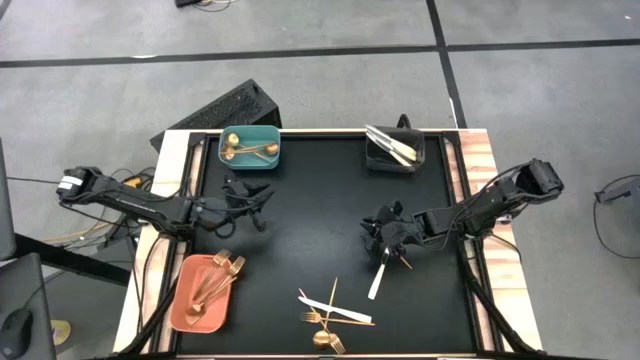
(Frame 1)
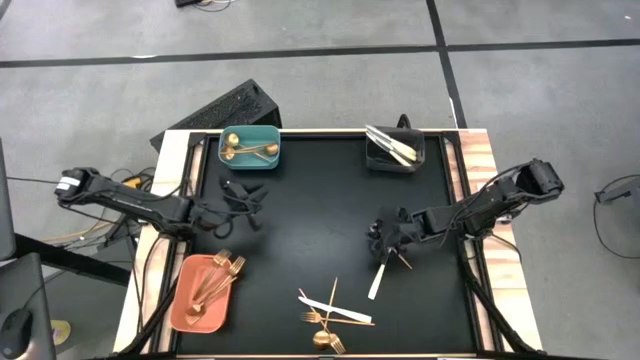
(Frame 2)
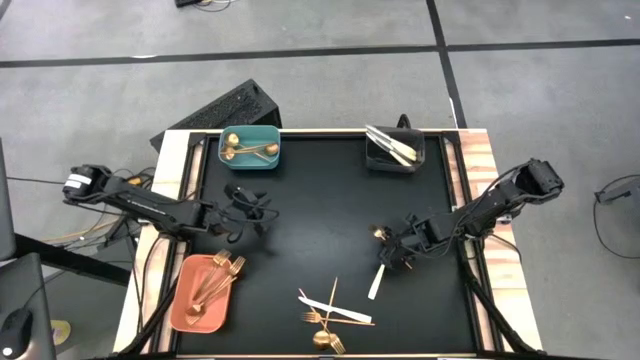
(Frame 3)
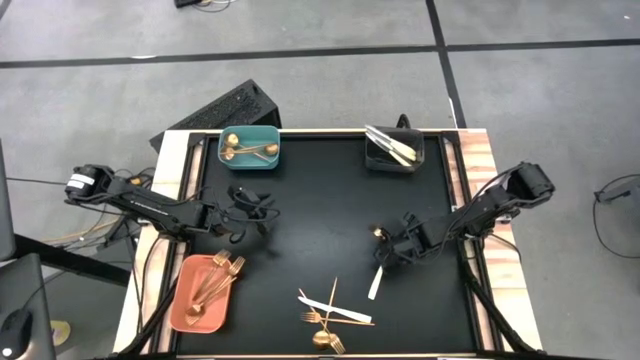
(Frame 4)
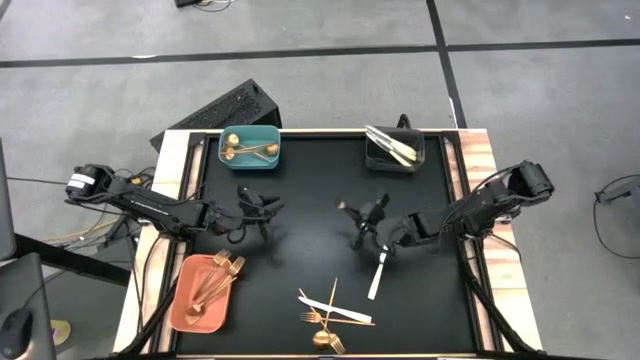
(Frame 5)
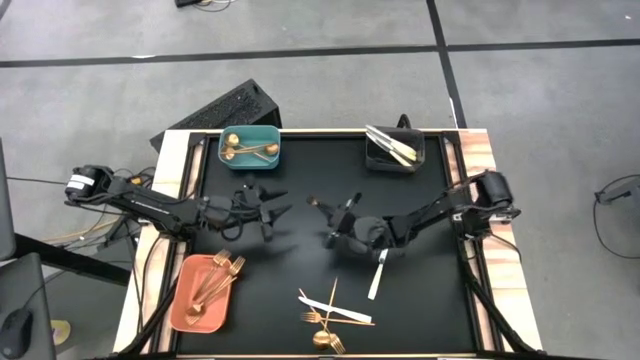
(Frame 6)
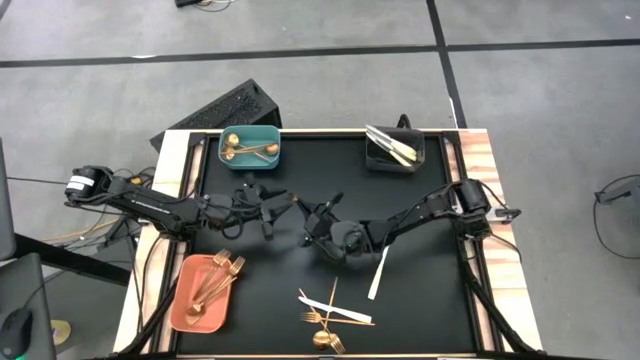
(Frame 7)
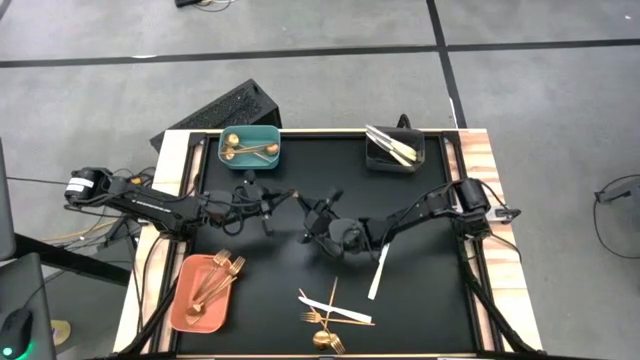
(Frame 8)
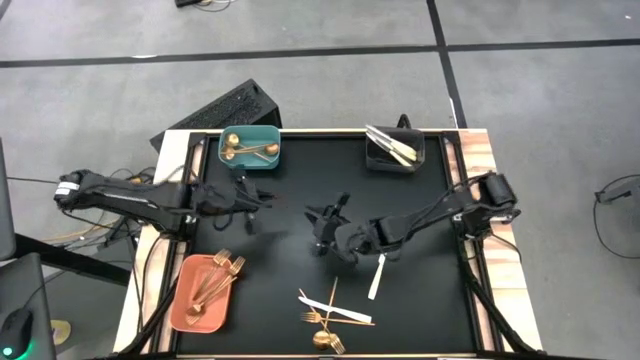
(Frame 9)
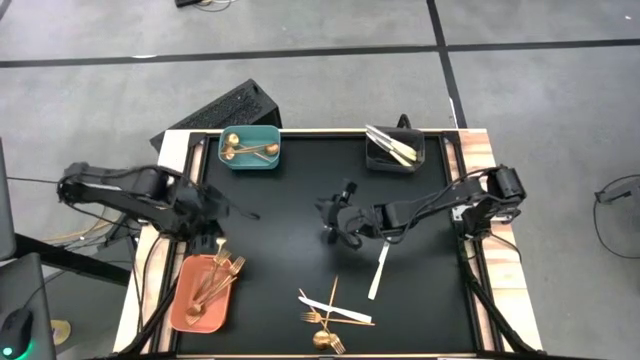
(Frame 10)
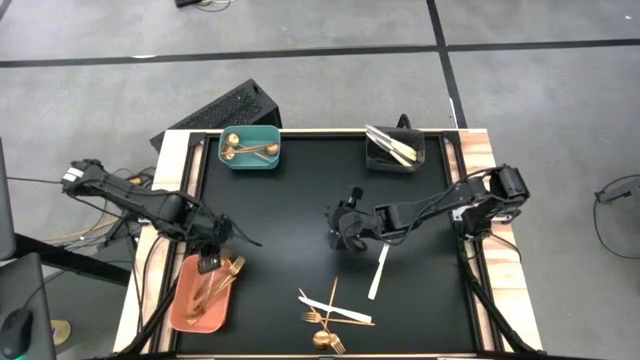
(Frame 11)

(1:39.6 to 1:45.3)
Task: Sort silverware by color (type)
Put the gold fork into the orange bin

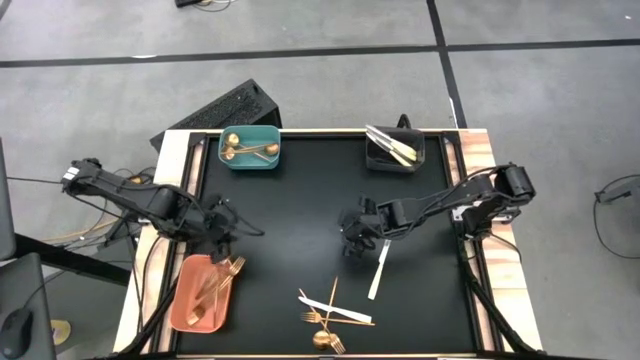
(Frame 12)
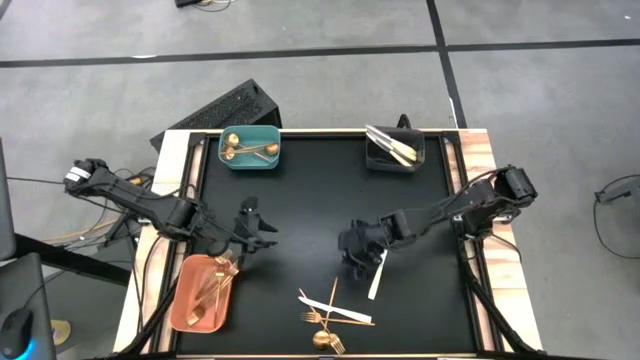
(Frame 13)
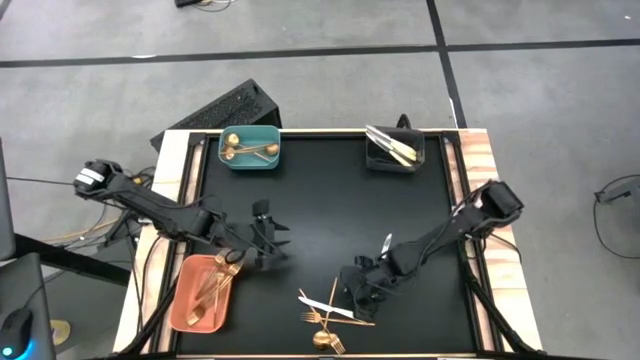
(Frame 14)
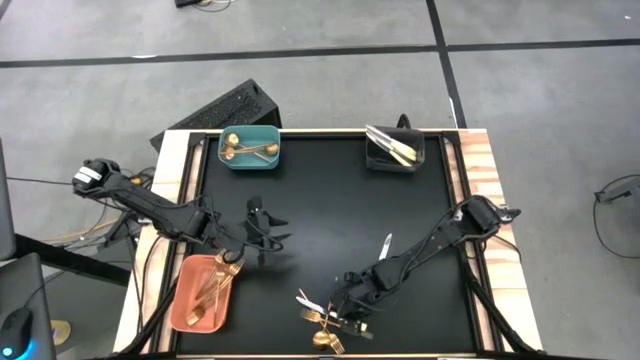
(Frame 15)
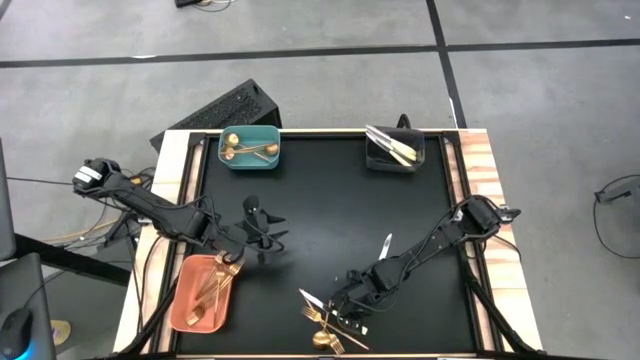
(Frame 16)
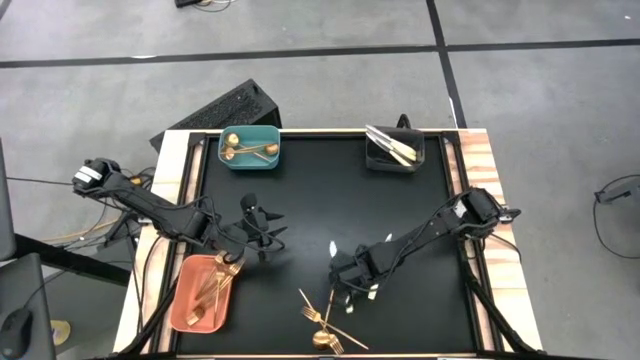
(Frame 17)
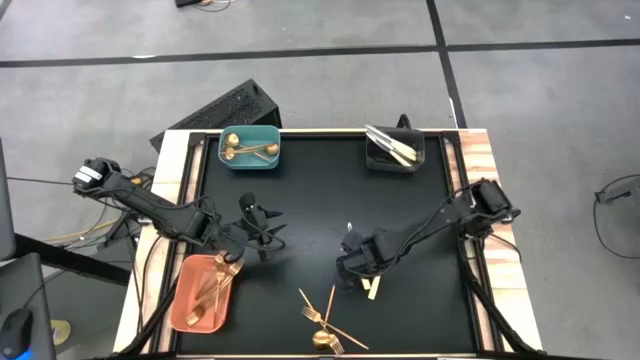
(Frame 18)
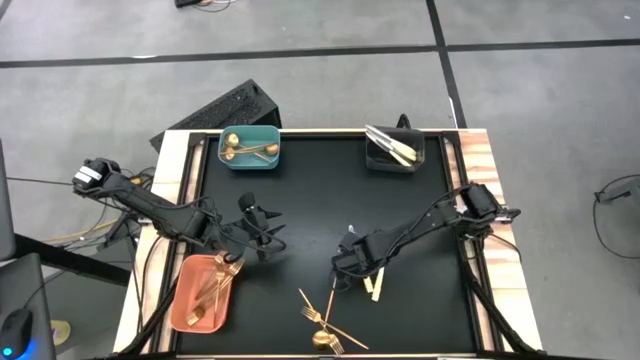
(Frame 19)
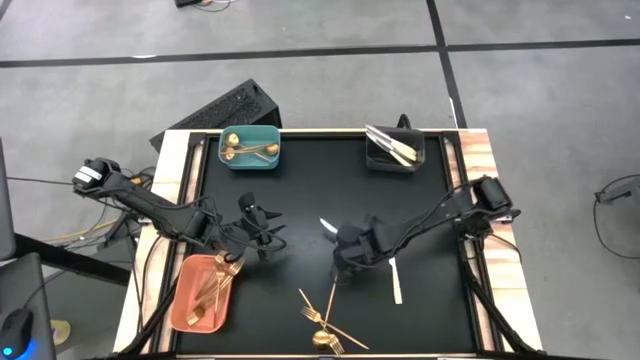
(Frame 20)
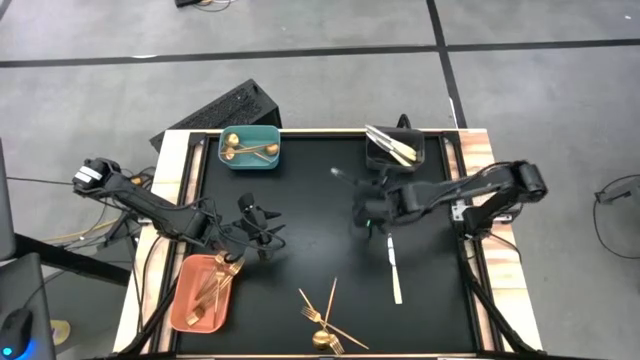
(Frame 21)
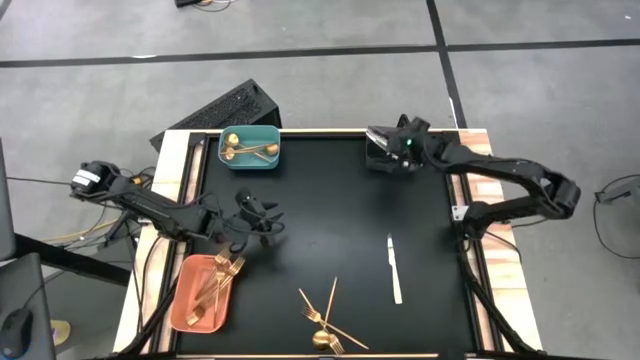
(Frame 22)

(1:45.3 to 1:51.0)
Put the white knife into the black bin

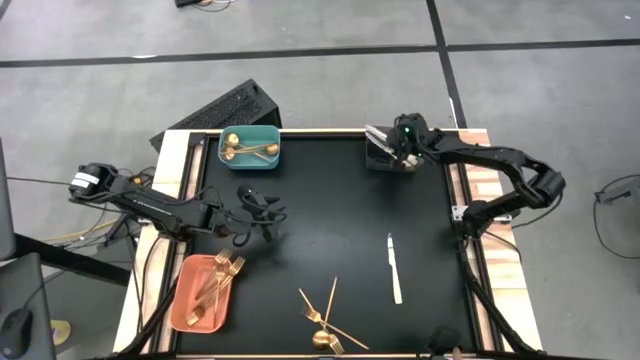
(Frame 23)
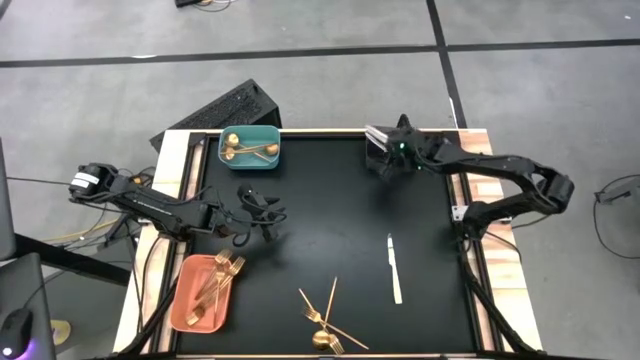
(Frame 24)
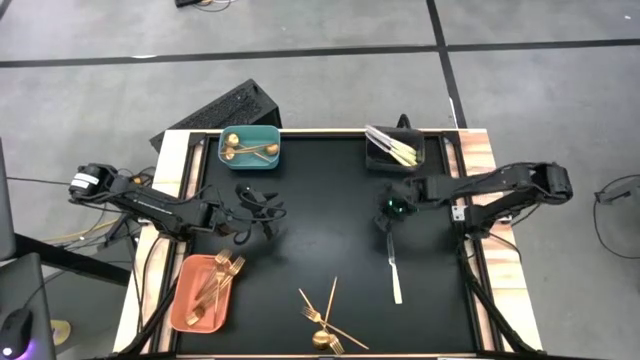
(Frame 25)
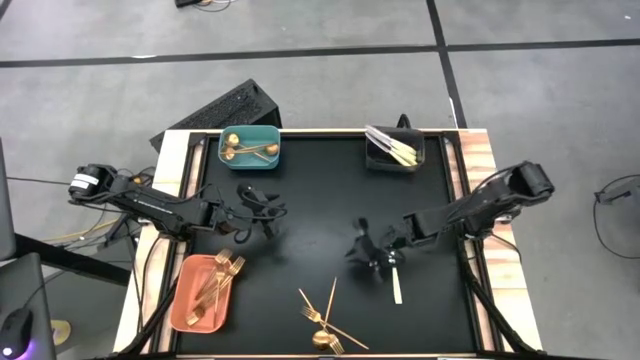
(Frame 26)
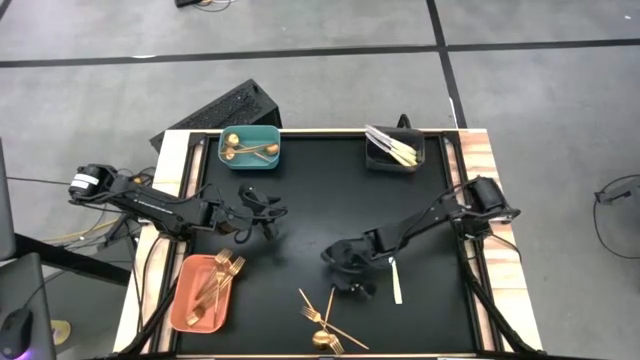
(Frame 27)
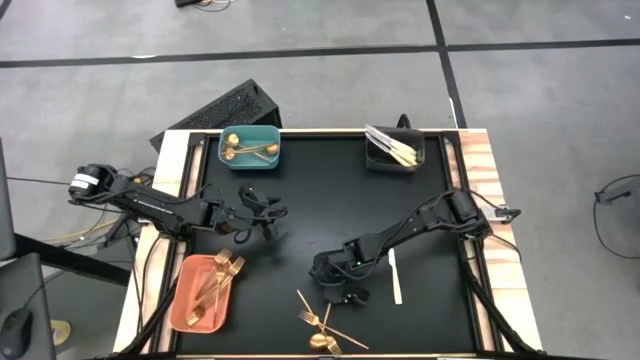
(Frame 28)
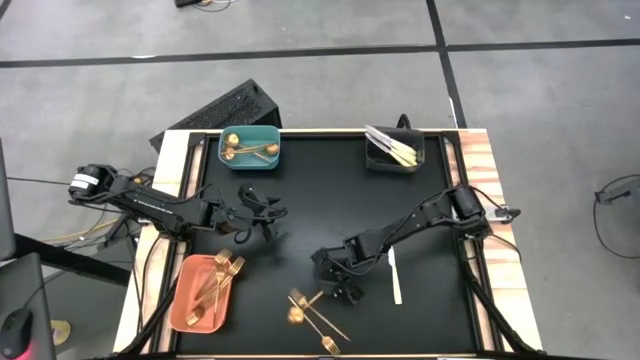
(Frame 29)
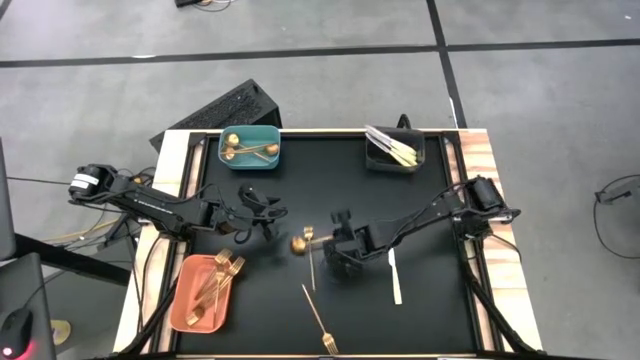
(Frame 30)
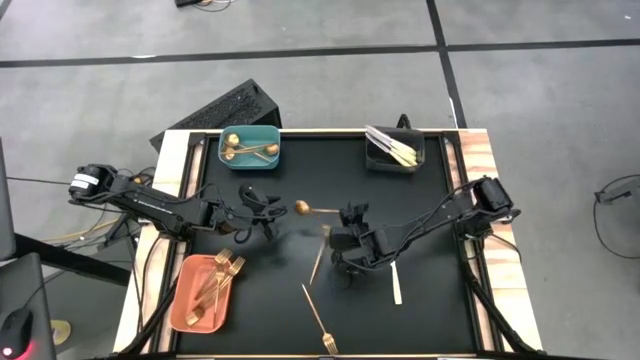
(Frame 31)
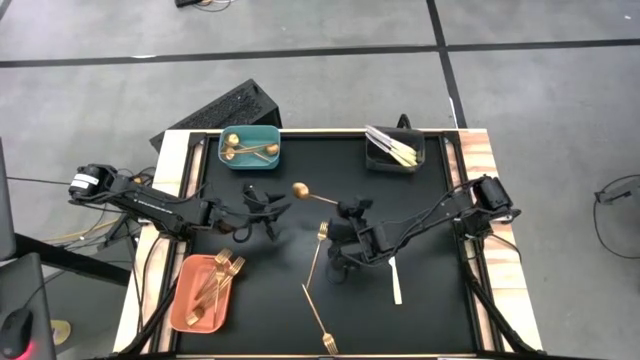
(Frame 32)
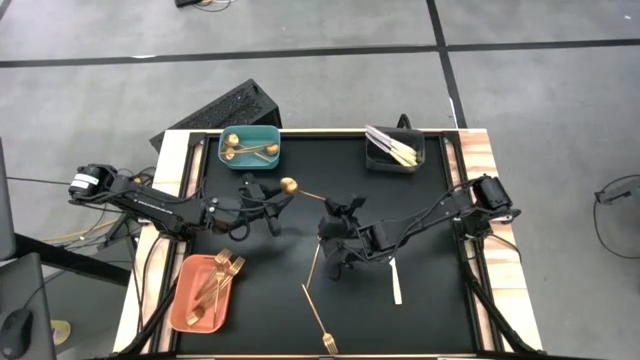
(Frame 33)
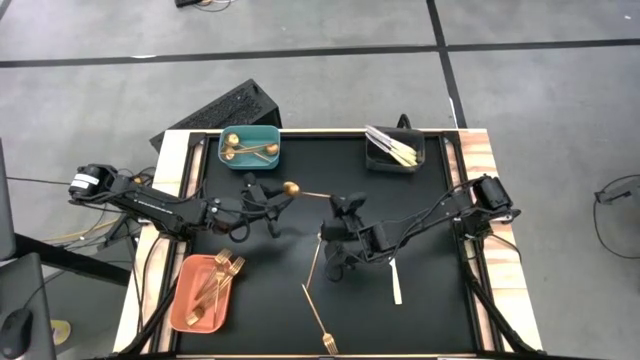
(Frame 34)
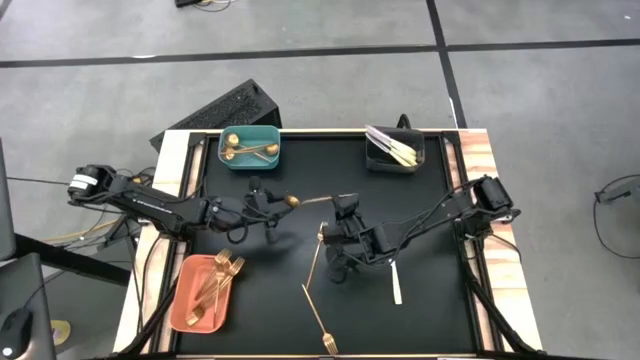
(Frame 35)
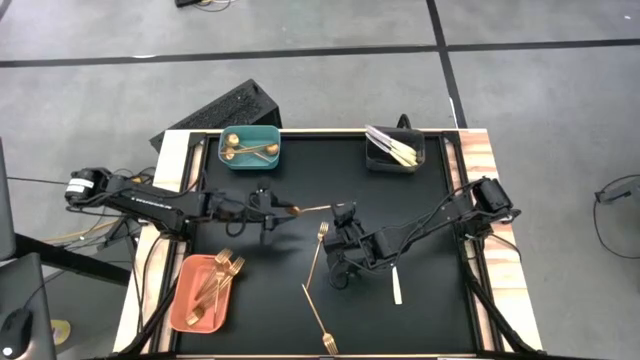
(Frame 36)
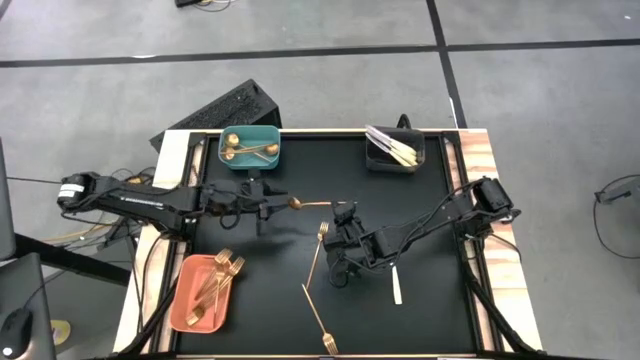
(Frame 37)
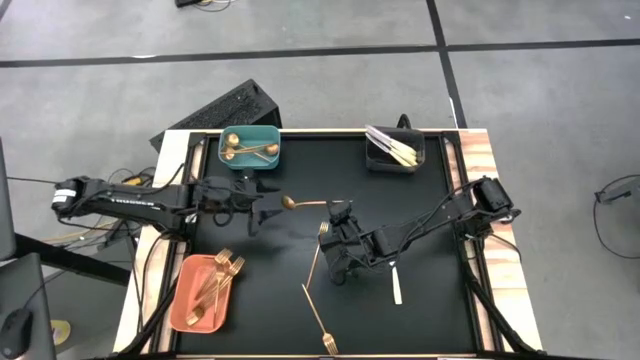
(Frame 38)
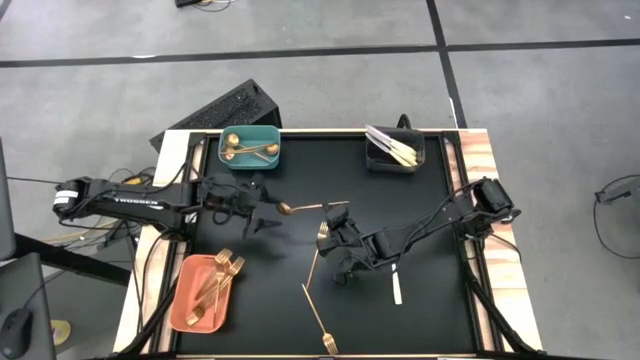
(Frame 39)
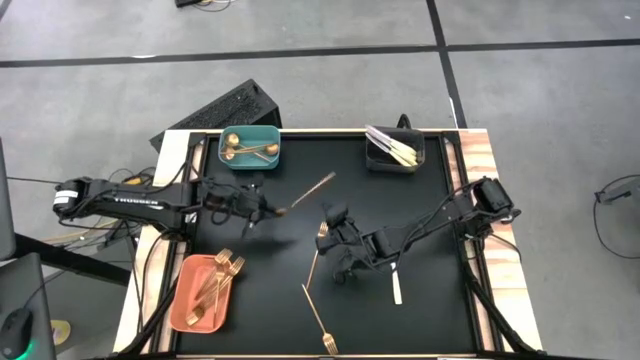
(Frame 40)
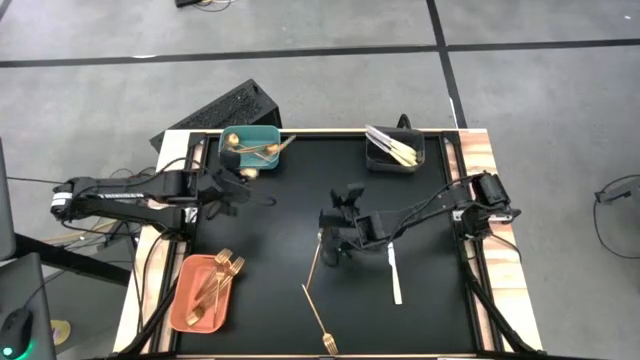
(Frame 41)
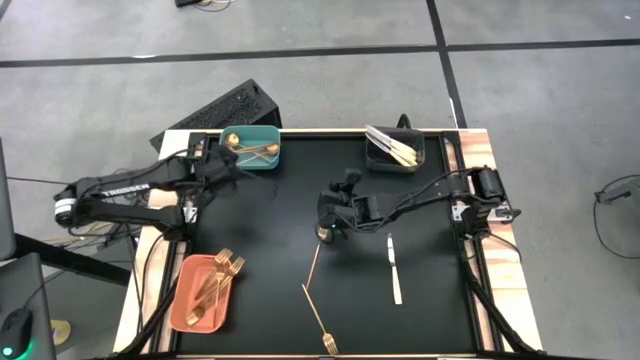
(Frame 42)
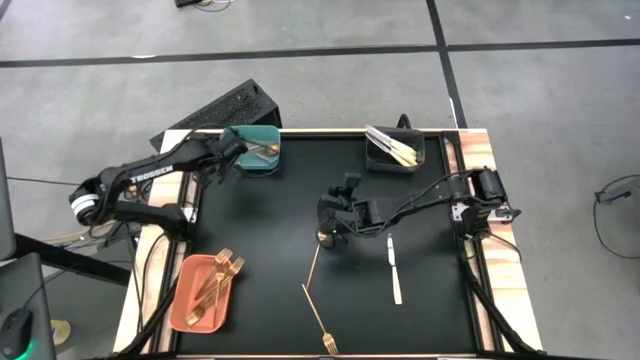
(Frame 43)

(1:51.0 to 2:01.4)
Put the gold spoon into the green bin
